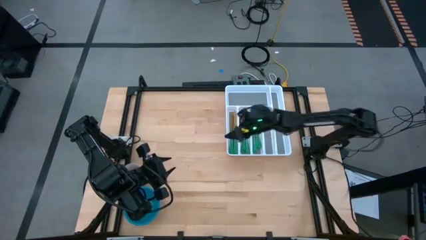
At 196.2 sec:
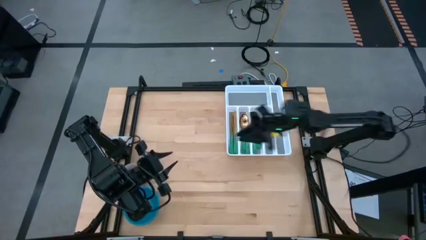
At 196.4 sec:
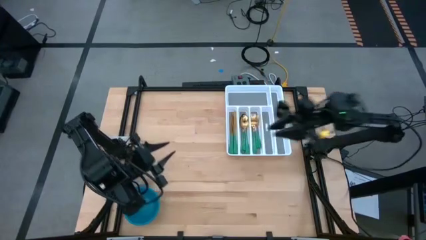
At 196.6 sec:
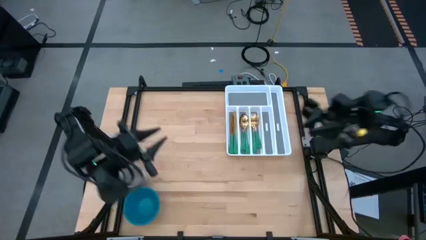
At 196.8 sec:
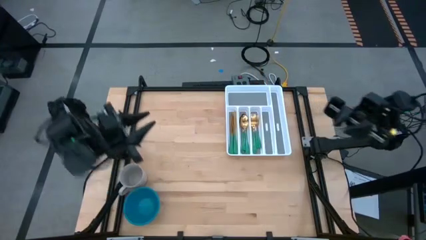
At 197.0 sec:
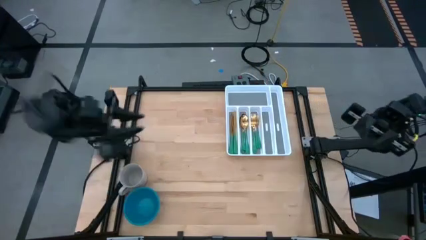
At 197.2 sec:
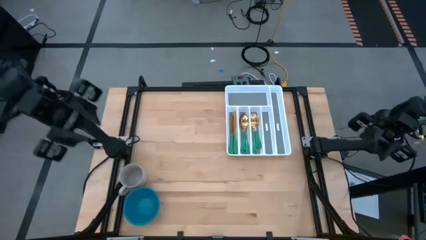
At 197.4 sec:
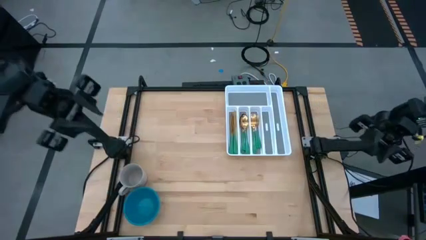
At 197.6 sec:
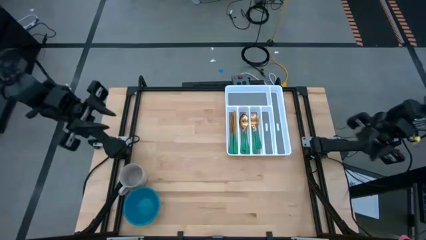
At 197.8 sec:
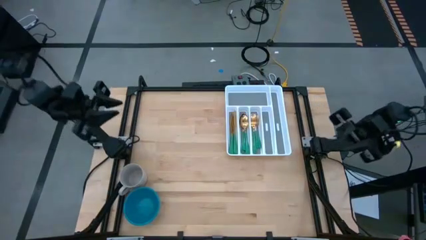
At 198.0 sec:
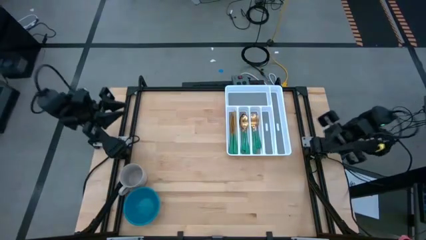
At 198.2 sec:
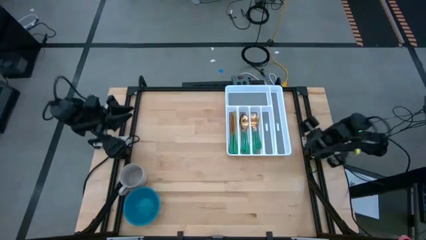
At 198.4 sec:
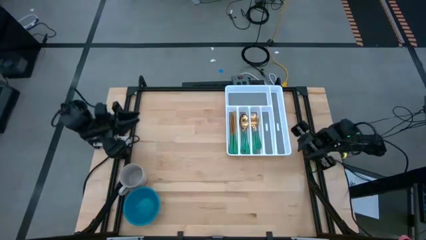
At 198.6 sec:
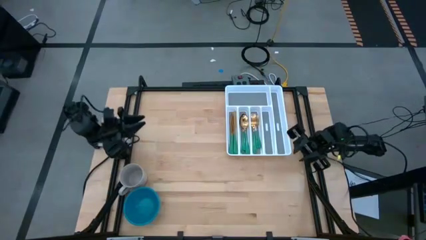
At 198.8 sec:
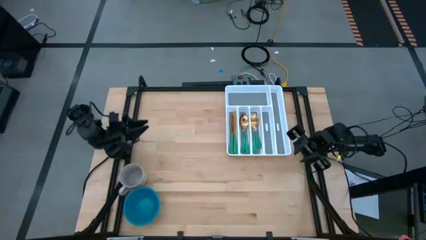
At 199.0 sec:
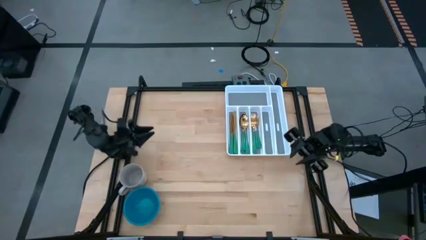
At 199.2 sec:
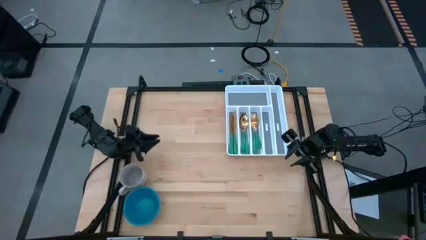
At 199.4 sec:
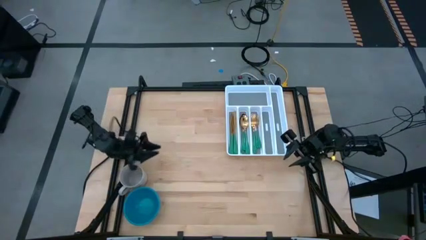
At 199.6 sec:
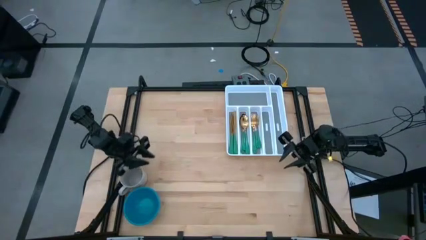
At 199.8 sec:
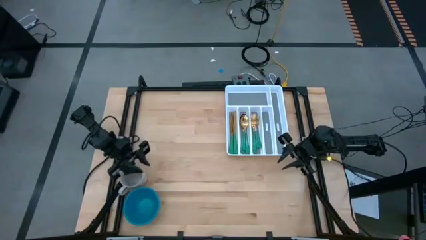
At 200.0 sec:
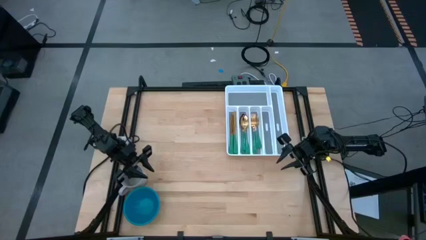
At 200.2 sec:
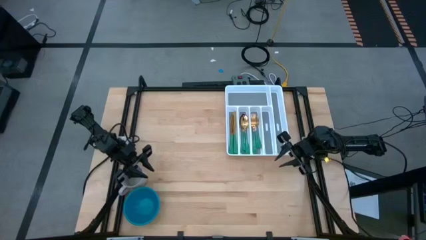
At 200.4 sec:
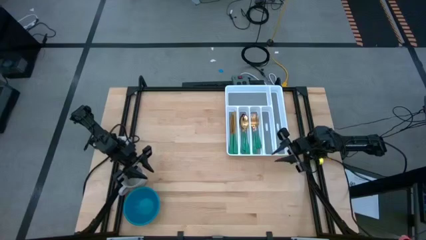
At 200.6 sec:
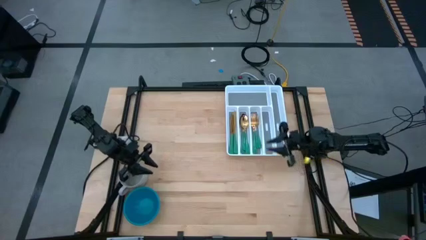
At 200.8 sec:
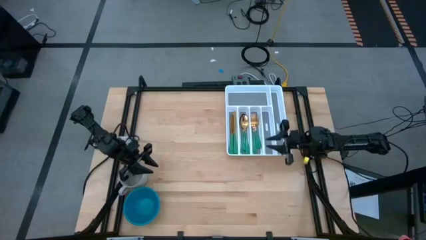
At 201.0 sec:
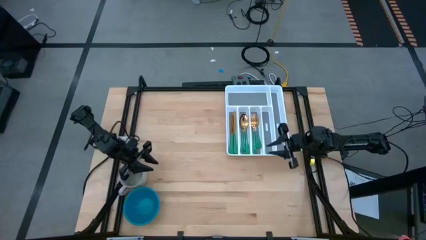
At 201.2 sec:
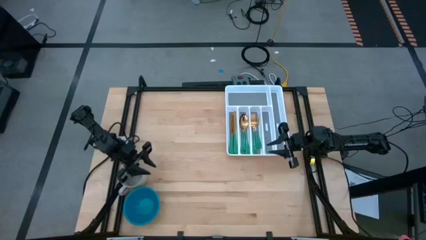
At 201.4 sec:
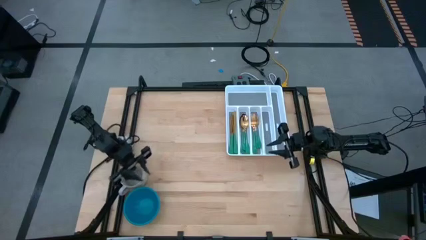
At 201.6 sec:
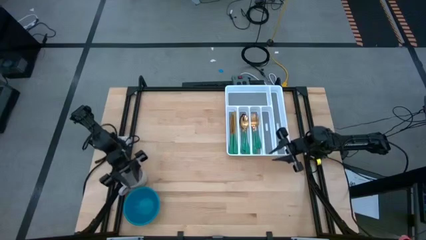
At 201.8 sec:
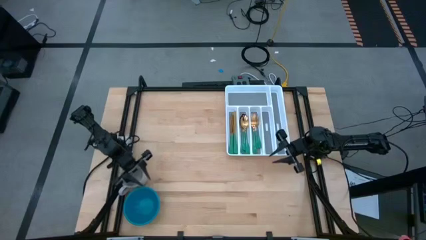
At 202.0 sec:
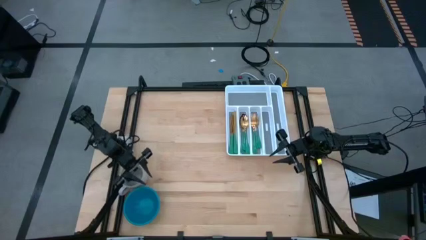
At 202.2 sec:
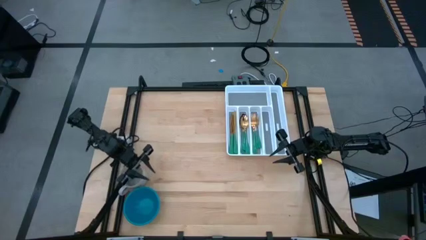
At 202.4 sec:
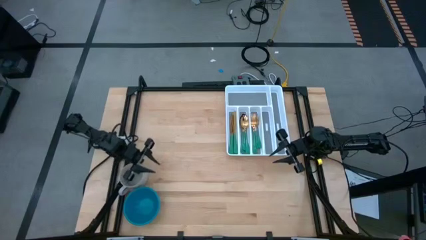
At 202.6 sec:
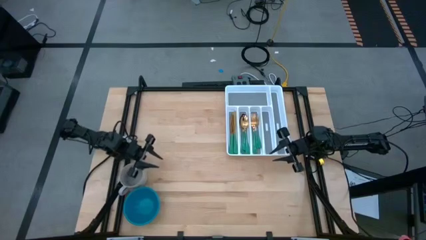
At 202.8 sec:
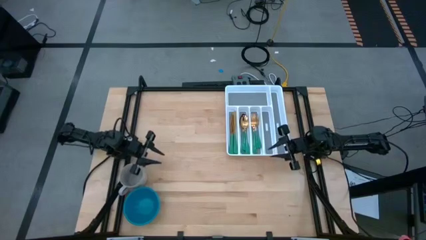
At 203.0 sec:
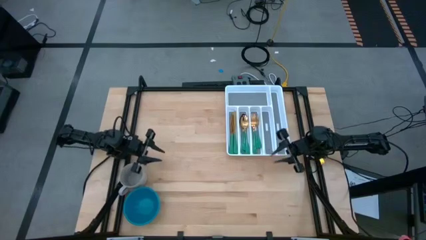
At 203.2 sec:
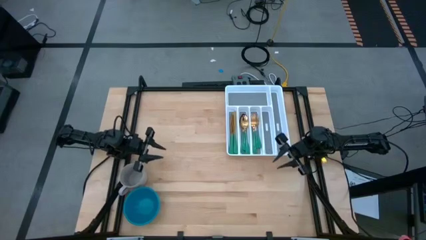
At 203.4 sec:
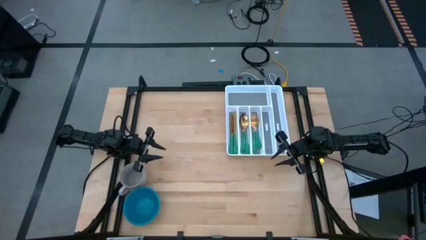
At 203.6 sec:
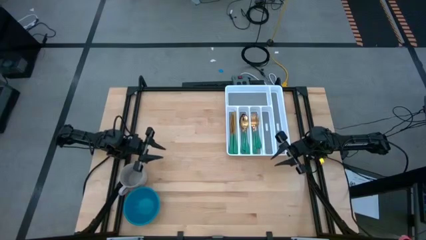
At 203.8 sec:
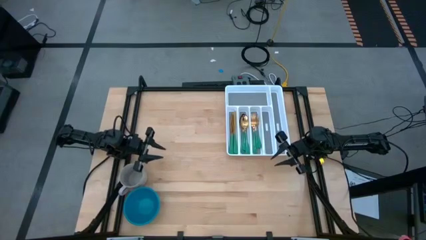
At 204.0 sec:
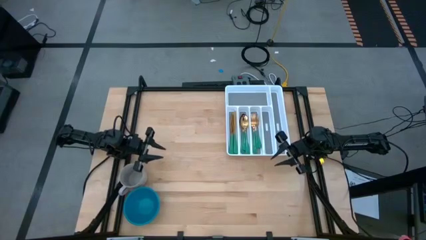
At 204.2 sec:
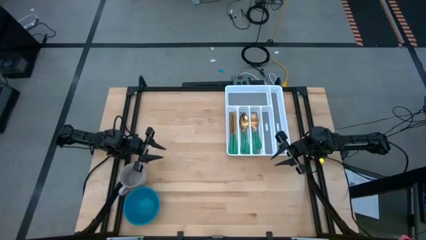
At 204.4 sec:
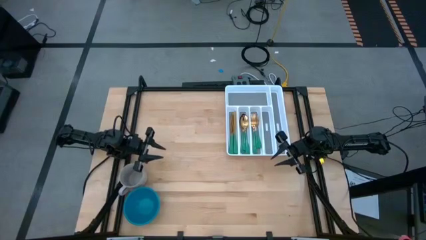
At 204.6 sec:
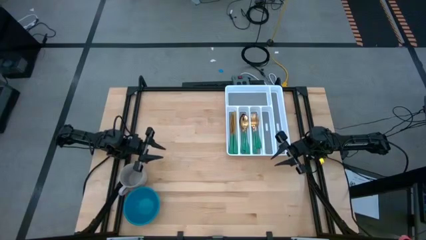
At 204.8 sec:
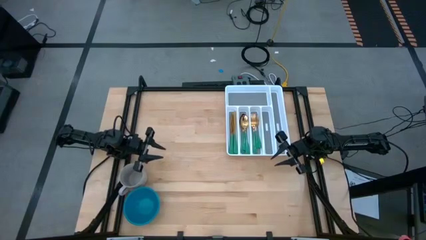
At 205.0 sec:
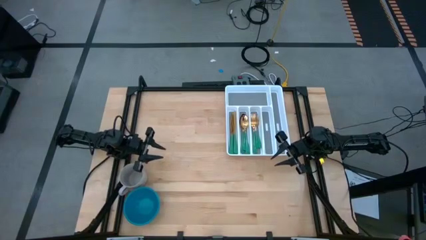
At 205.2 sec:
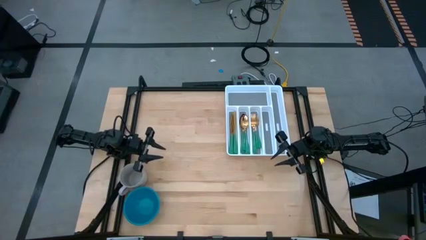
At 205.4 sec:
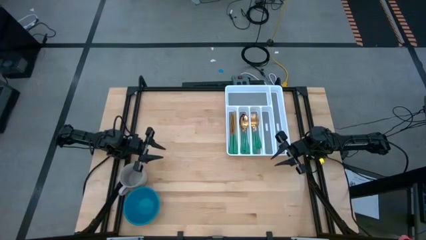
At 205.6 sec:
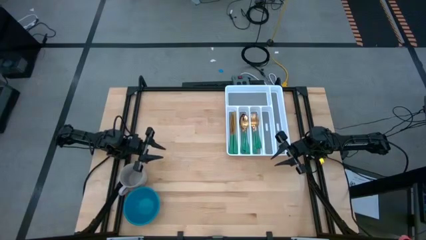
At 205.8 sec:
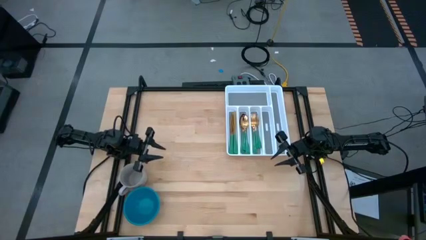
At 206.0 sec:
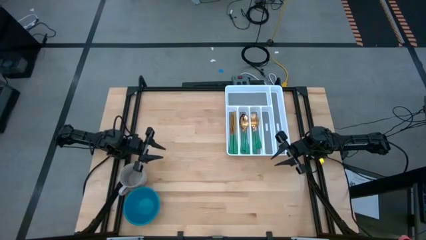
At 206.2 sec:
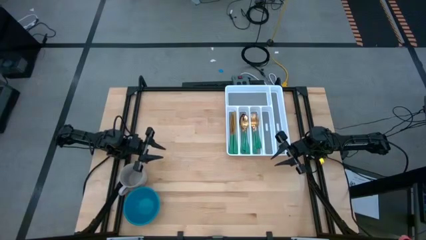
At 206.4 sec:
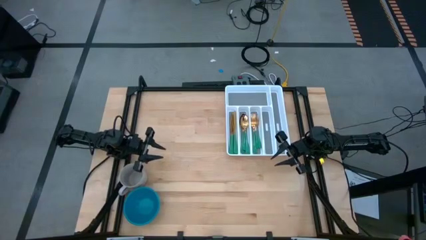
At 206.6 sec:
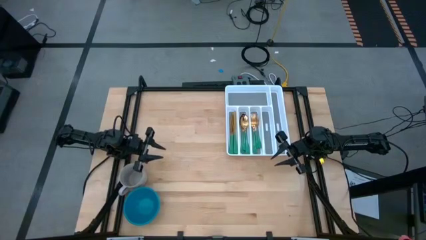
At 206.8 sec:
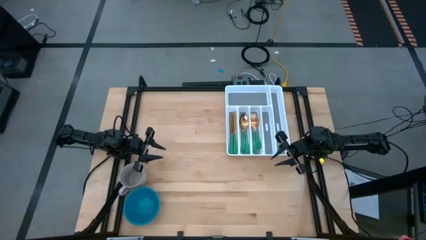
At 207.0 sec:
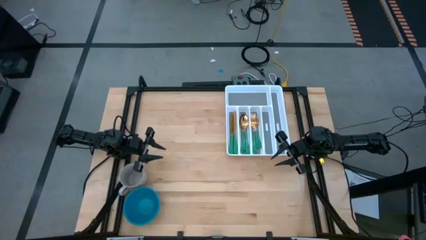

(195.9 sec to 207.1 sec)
Task: Sort silverware
Return to Home Position

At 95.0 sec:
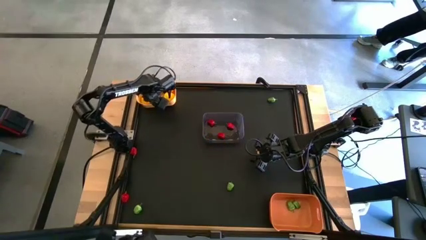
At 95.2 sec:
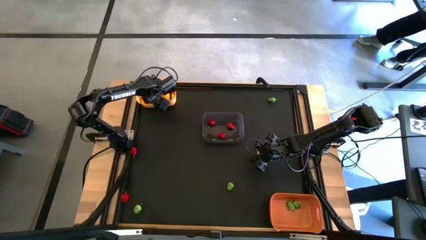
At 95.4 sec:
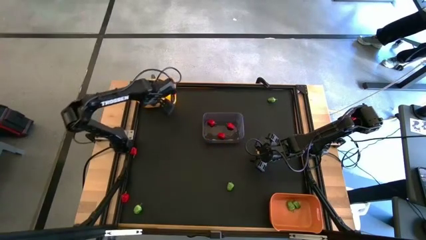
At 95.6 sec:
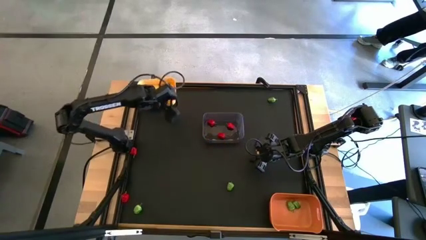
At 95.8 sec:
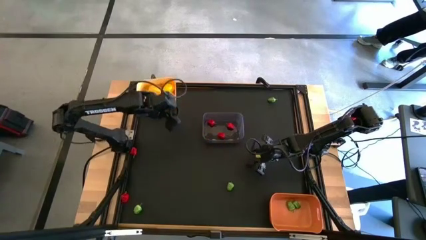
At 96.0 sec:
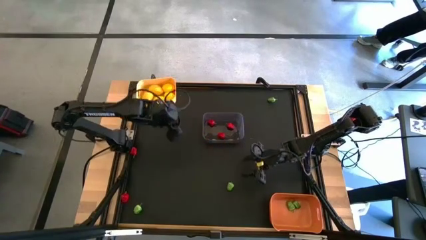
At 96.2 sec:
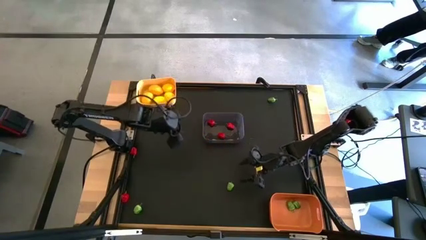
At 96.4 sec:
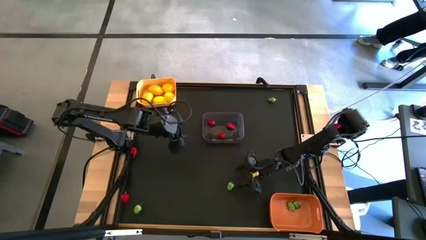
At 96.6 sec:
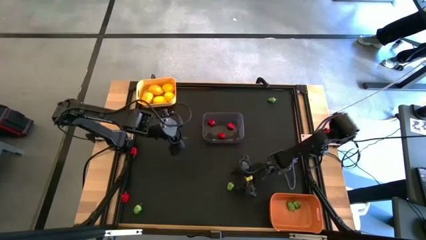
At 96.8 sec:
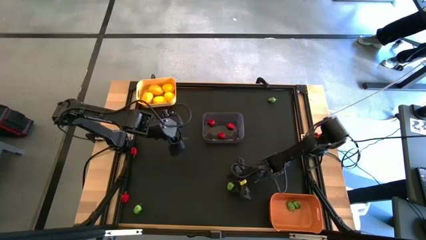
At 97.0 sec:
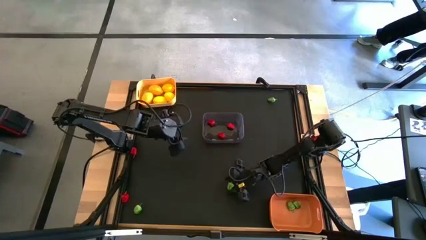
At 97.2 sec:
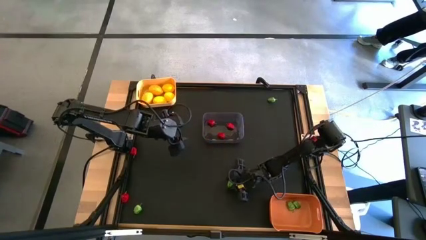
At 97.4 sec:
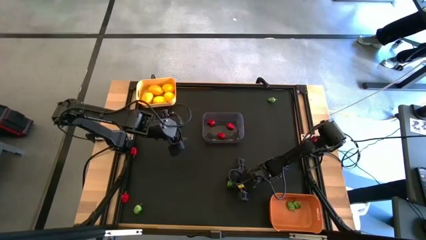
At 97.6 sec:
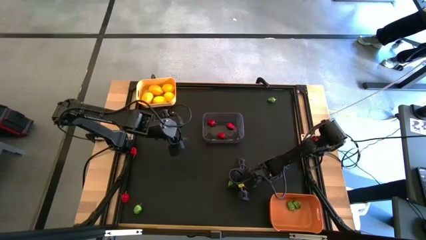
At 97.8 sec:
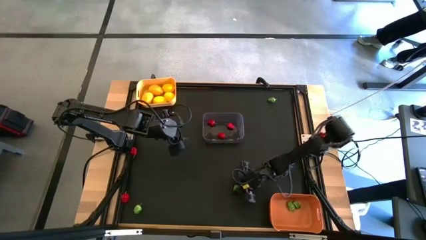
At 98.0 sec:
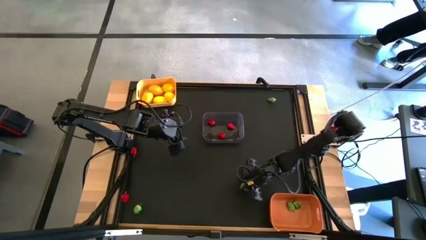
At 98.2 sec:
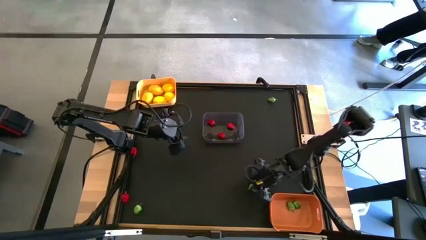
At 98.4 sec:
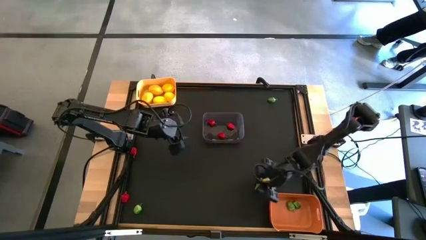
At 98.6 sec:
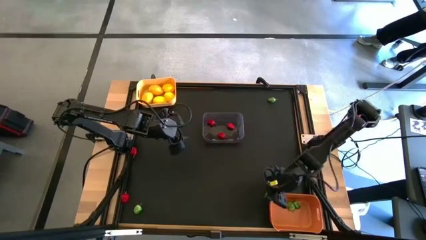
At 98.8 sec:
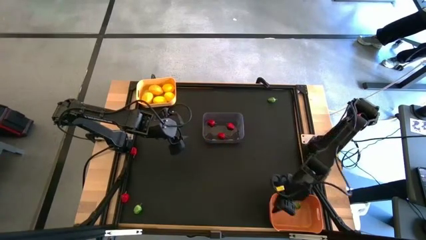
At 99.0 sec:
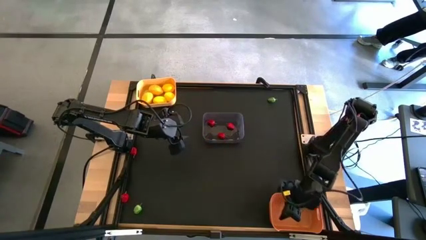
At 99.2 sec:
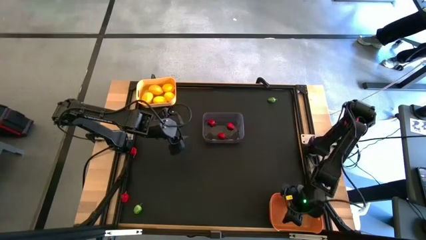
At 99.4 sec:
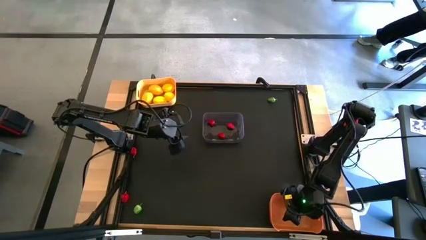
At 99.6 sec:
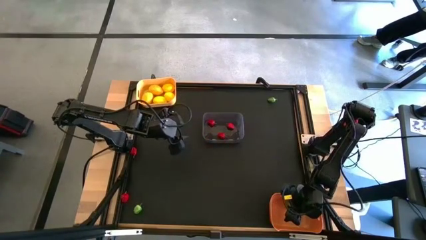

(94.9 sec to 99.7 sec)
Task: Sort produce into baskets
Put the green bell pepper into the orange bin
